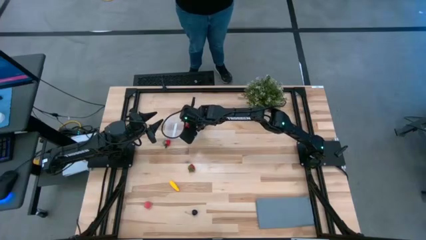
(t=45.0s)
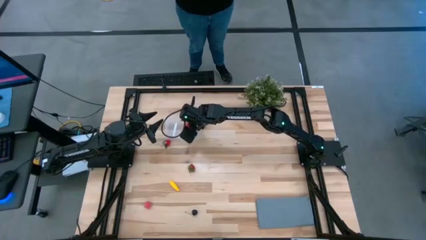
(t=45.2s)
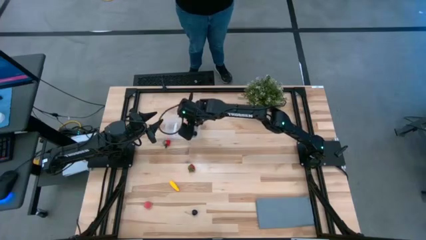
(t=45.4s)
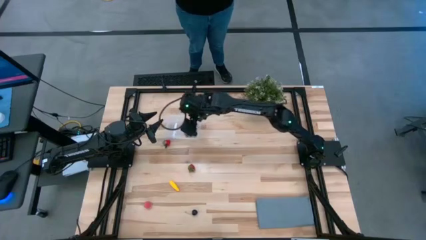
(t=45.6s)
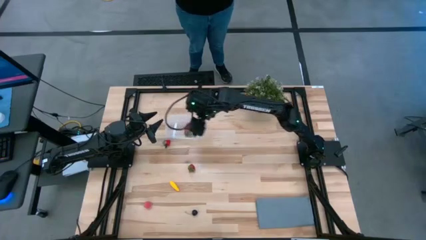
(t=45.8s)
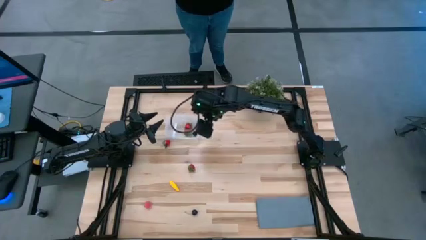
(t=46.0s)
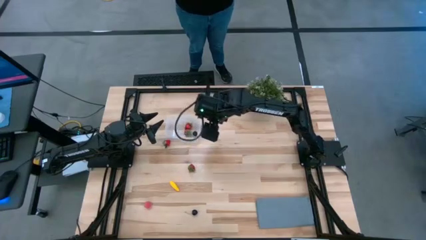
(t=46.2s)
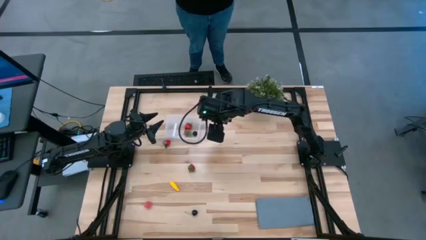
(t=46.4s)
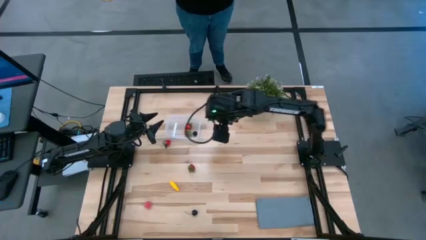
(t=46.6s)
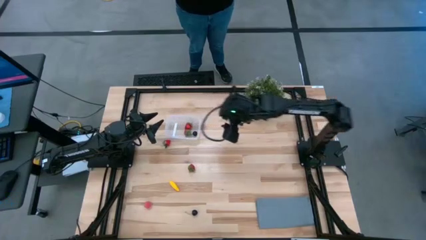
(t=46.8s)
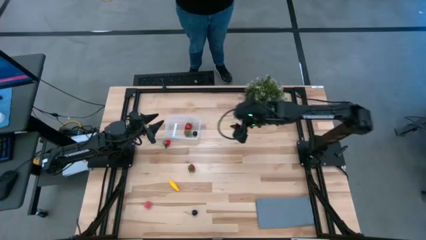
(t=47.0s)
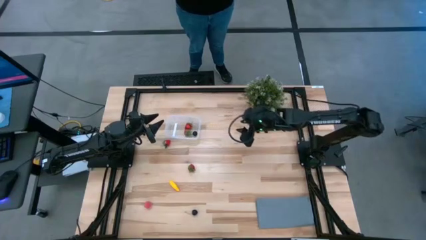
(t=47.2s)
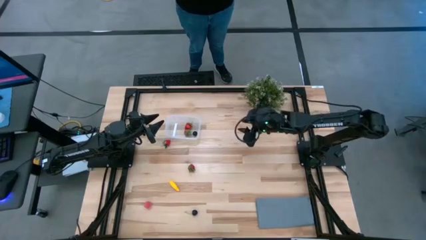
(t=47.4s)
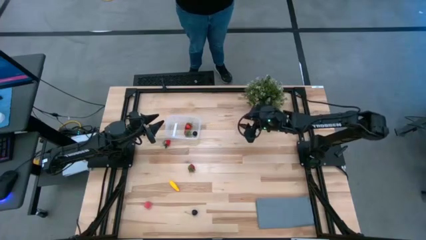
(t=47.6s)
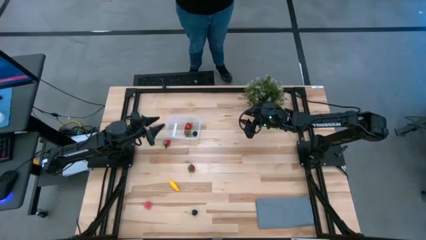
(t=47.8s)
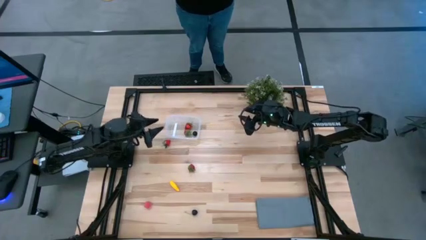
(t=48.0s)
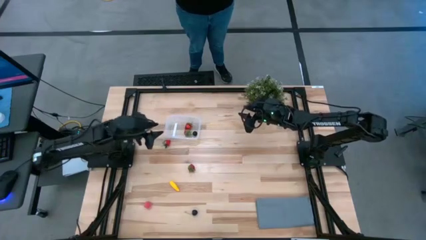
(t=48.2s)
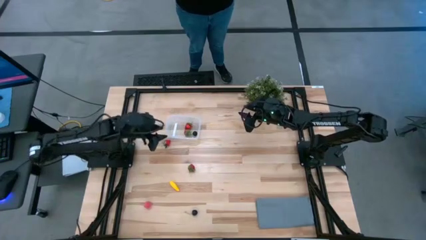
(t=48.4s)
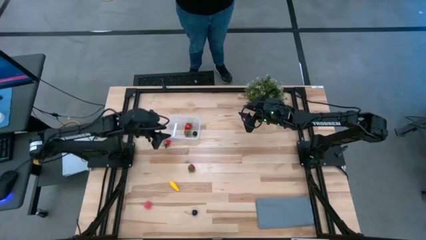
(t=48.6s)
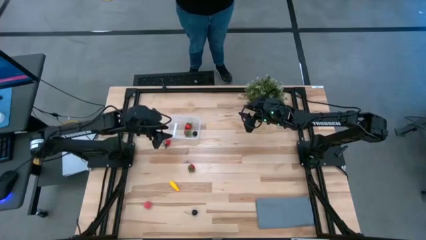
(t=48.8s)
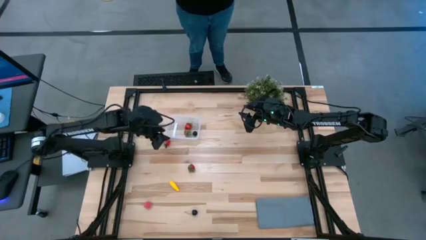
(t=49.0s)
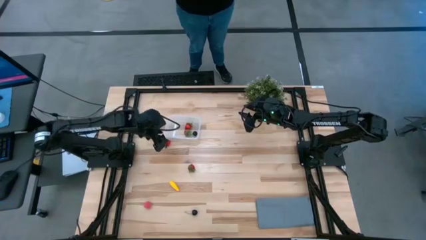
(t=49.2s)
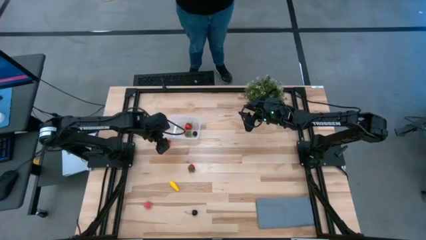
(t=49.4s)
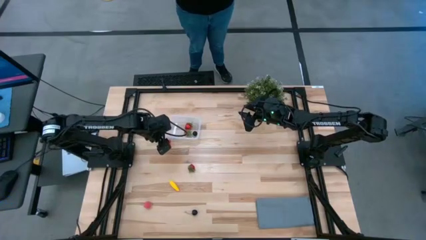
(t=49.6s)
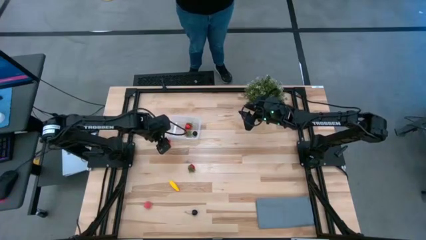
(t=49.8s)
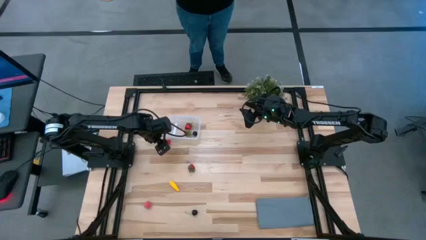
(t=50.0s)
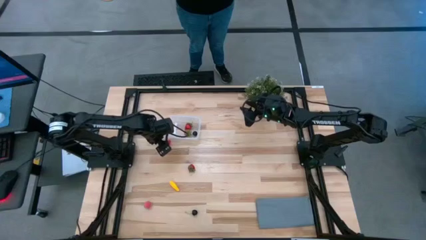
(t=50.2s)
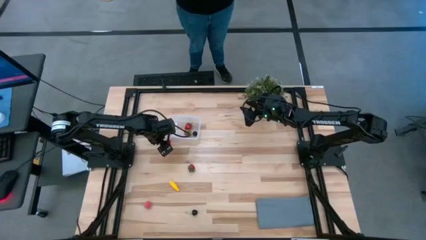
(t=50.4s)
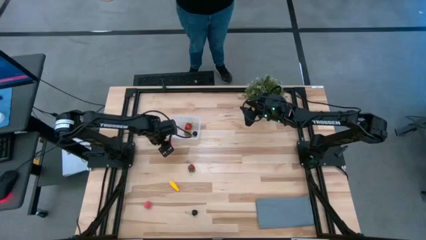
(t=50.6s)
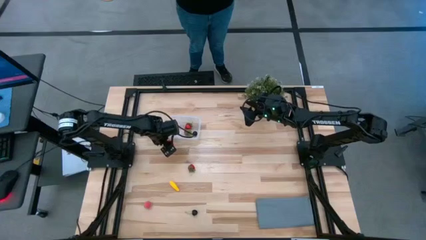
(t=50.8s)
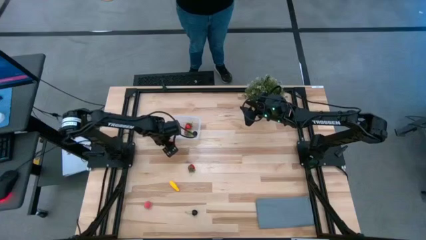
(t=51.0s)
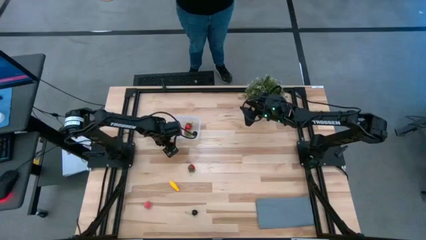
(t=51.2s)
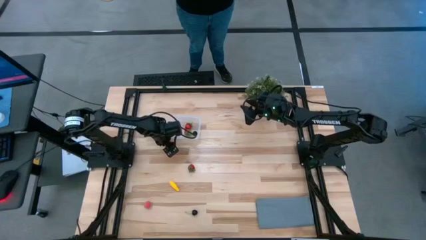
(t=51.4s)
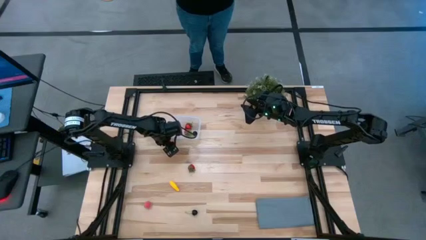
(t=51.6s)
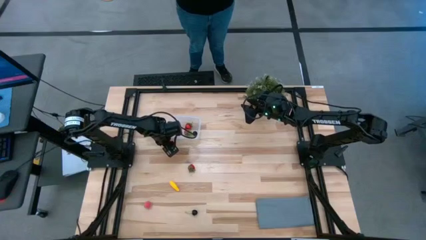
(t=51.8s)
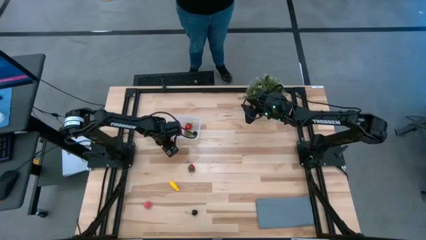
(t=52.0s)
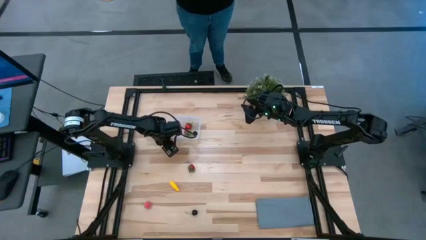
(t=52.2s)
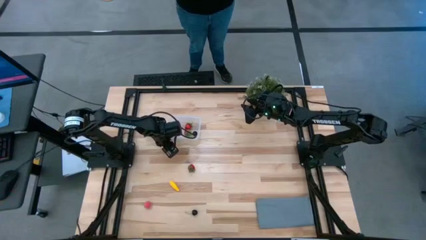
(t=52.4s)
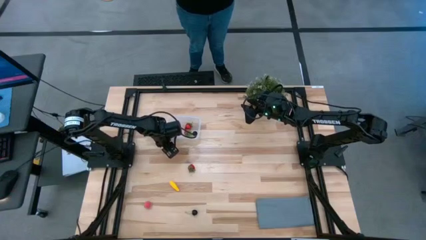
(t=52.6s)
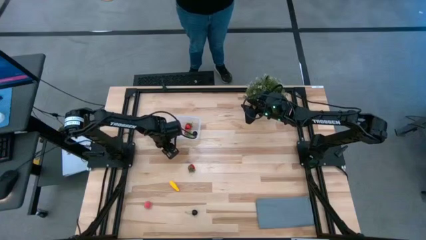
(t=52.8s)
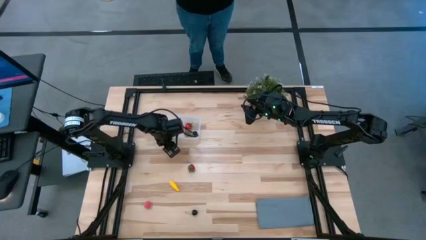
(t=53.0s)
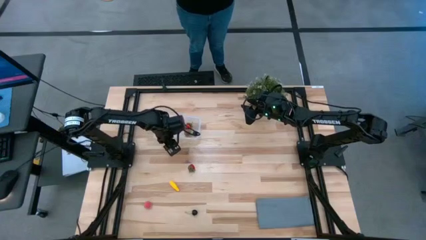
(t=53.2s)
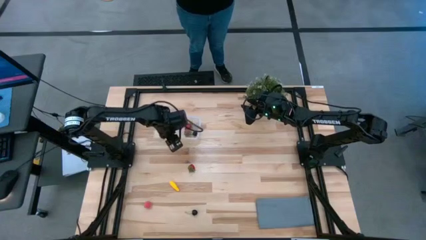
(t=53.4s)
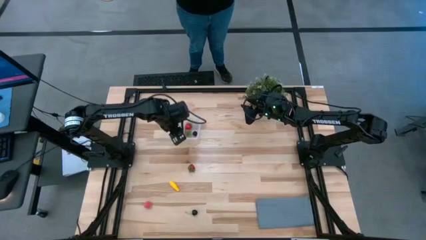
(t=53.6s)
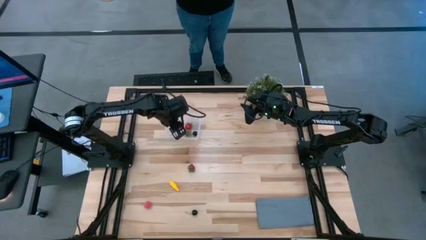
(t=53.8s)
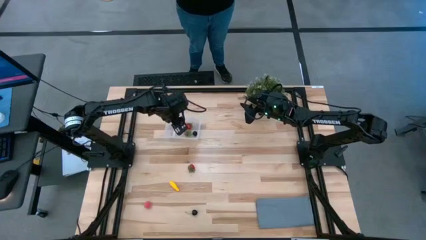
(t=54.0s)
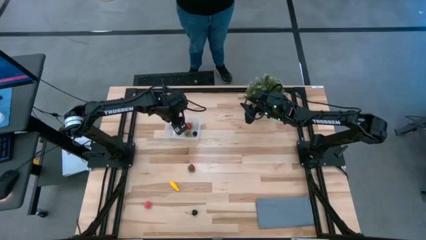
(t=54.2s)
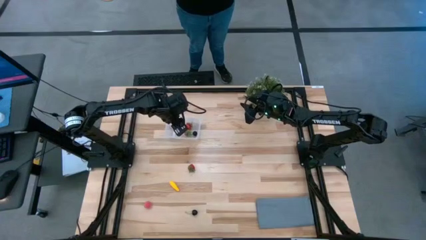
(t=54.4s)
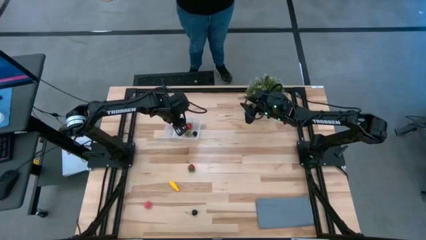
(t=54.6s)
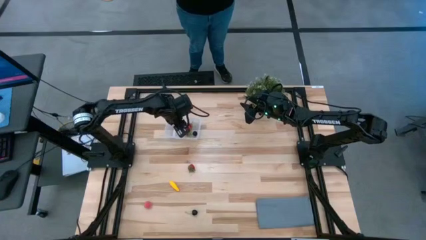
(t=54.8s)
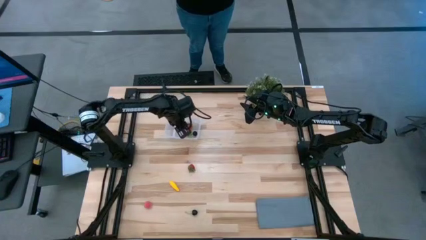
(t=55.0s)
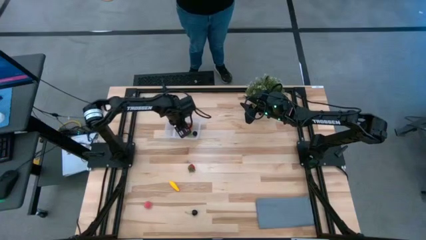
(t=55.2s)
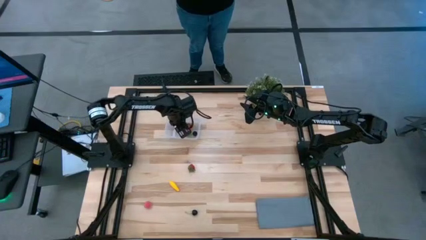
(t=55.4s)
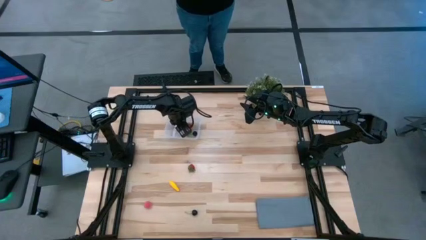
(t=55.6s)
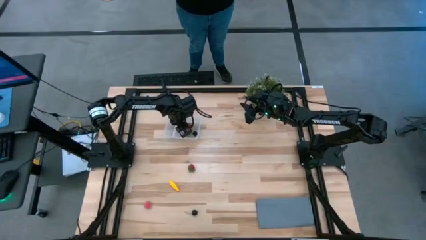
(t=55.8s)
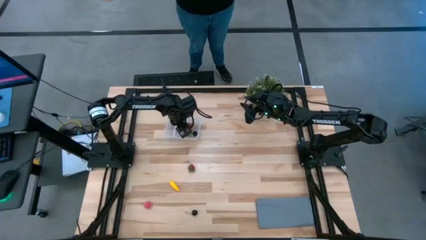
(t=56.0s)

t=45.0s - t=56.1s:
Task: Pick and placing Produce into tupperware
Put the top strawberry into the transparent bin
